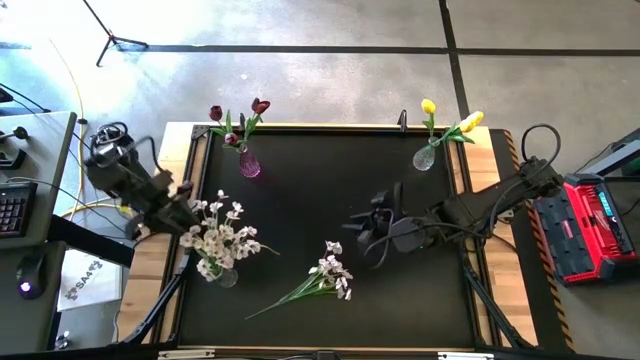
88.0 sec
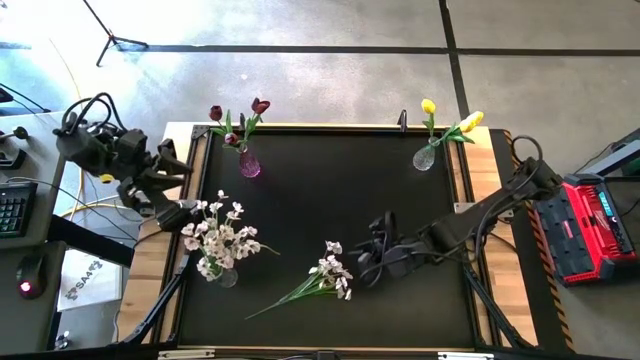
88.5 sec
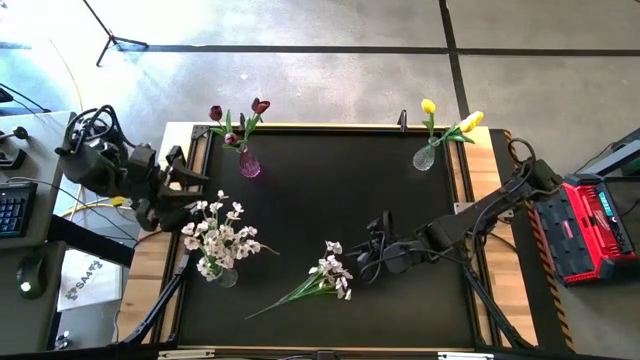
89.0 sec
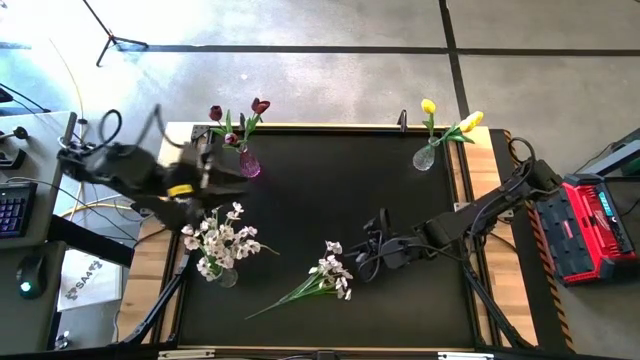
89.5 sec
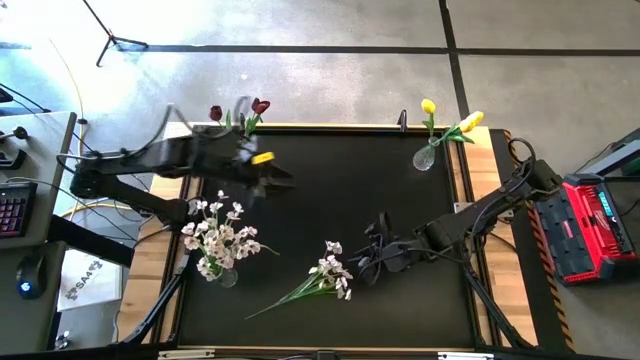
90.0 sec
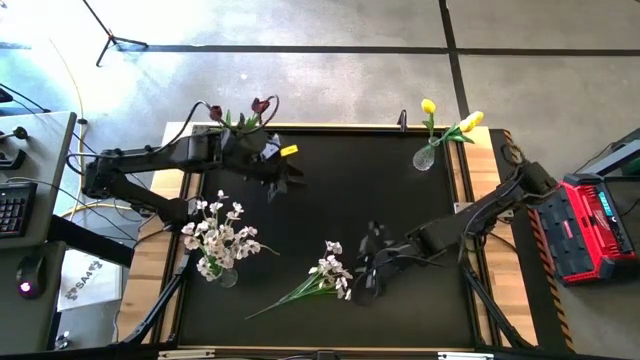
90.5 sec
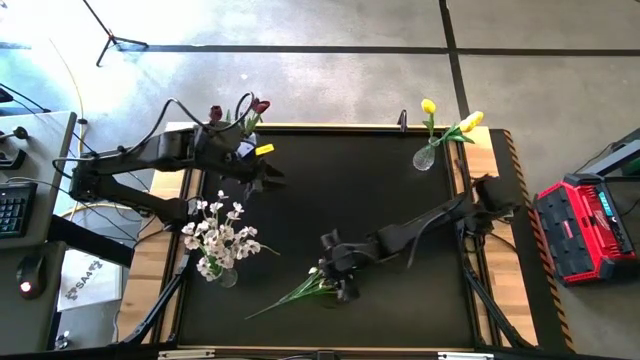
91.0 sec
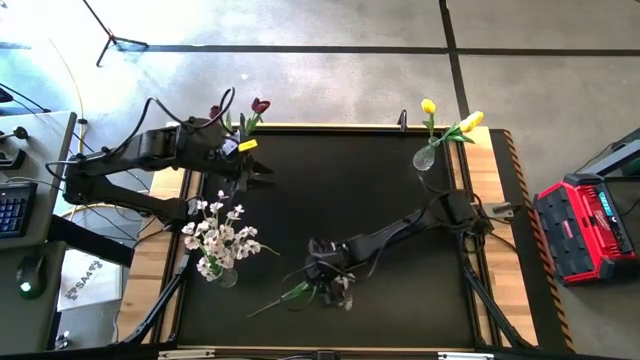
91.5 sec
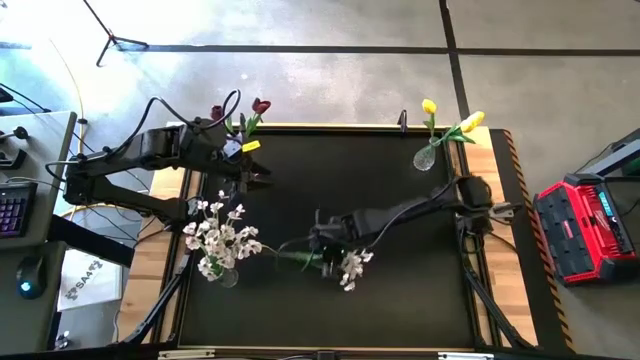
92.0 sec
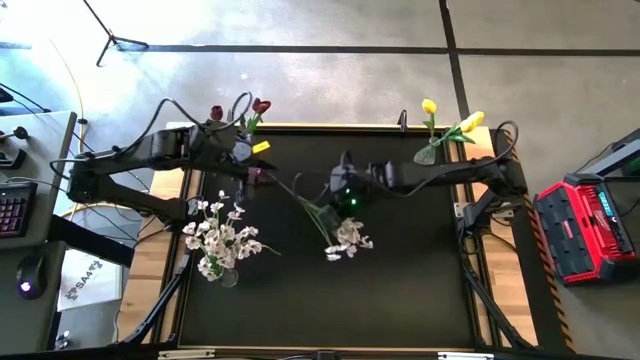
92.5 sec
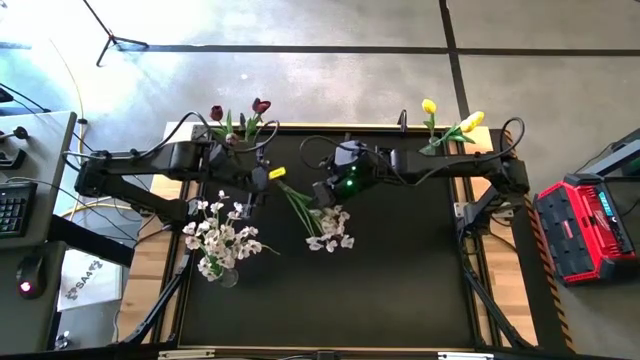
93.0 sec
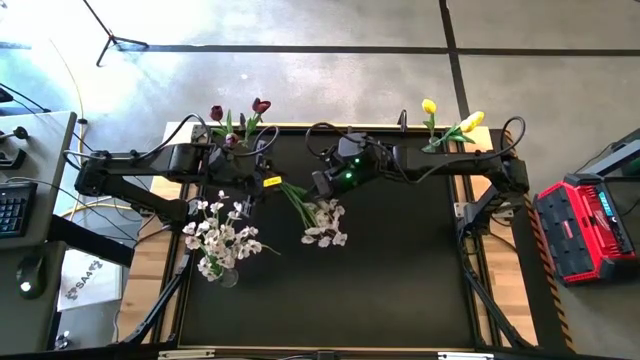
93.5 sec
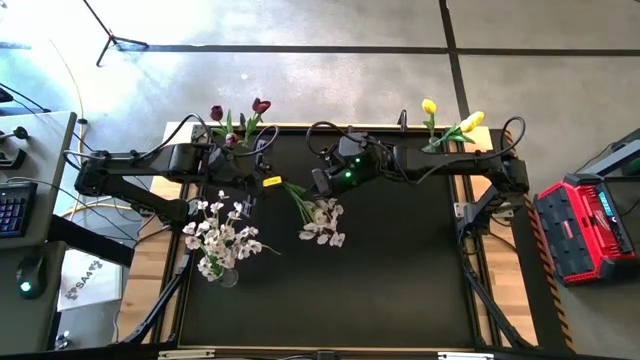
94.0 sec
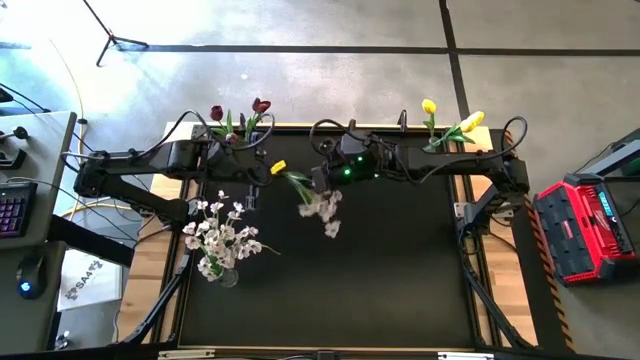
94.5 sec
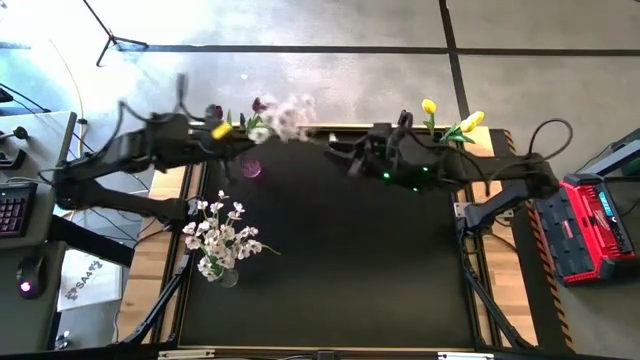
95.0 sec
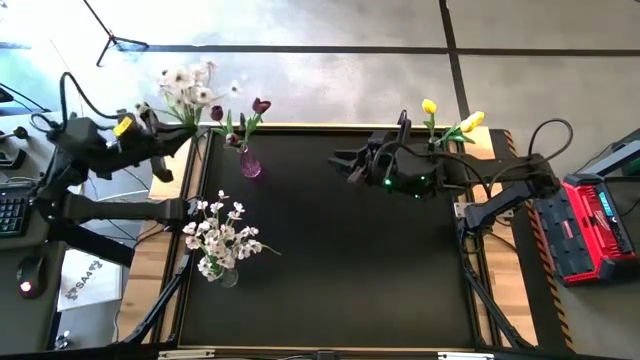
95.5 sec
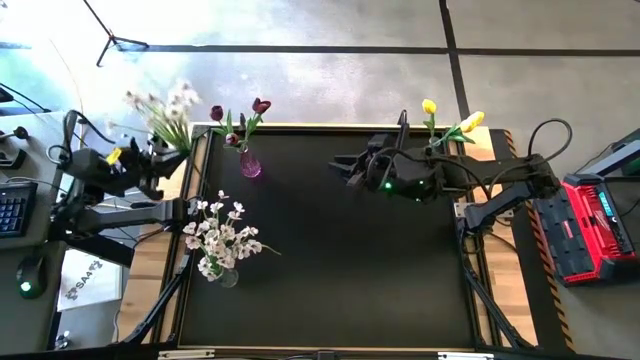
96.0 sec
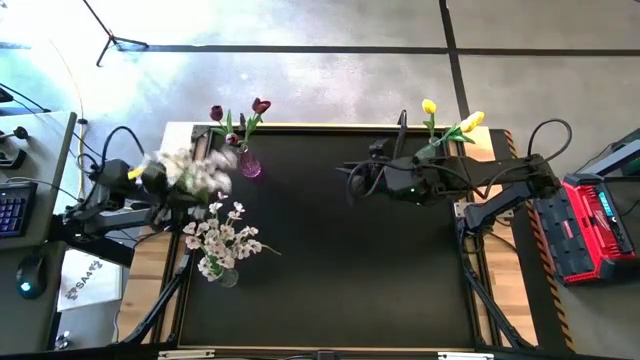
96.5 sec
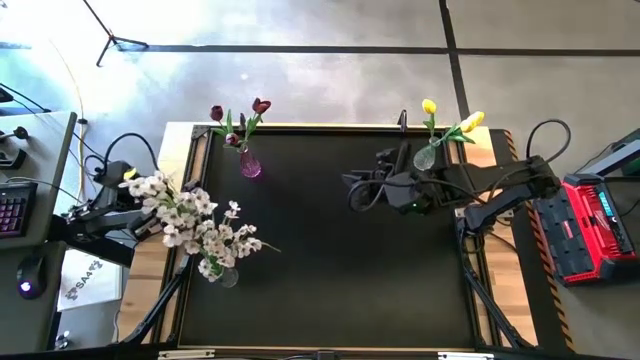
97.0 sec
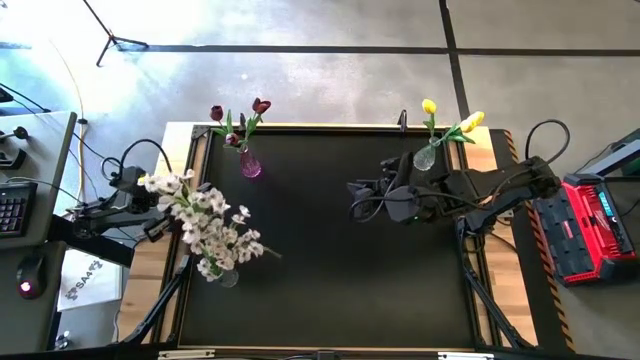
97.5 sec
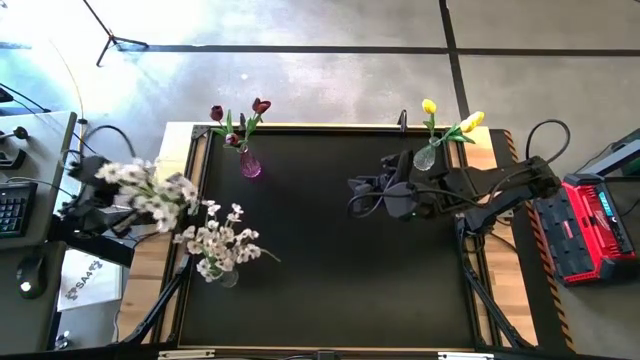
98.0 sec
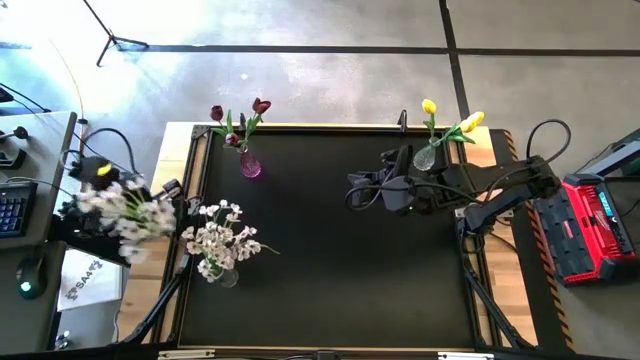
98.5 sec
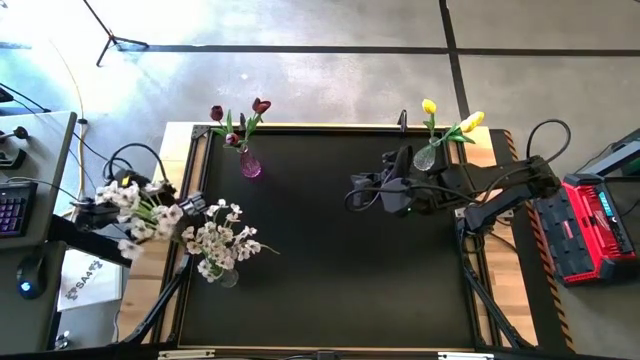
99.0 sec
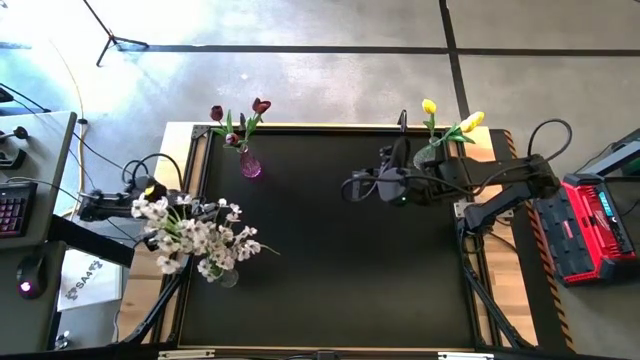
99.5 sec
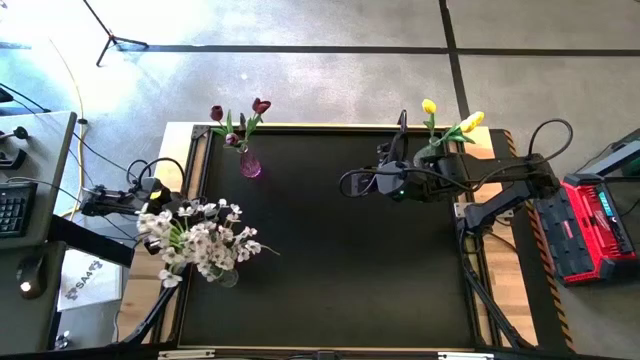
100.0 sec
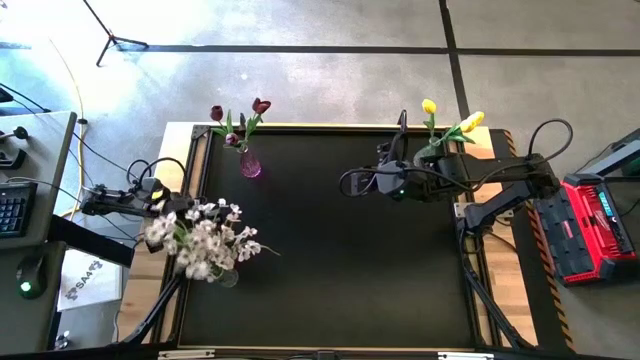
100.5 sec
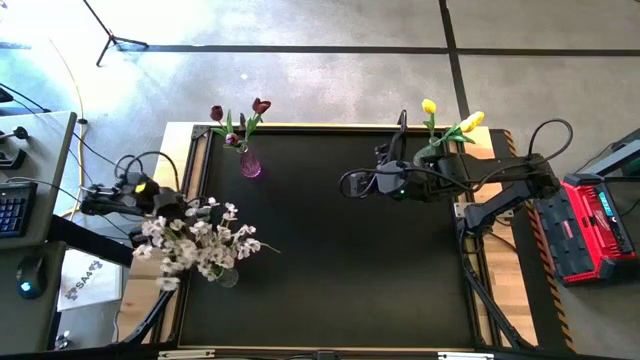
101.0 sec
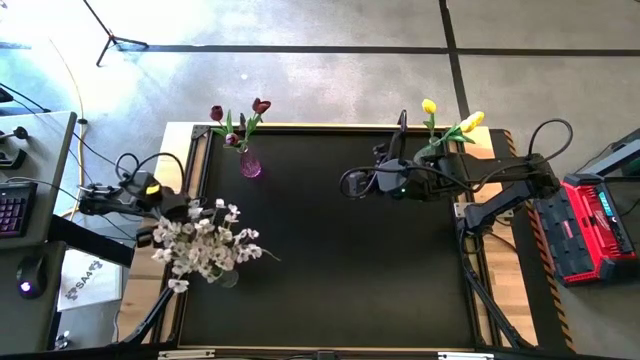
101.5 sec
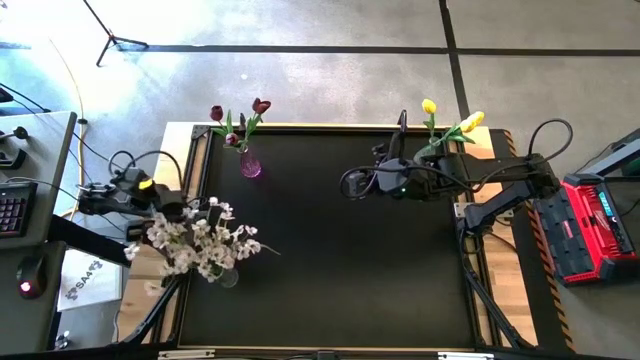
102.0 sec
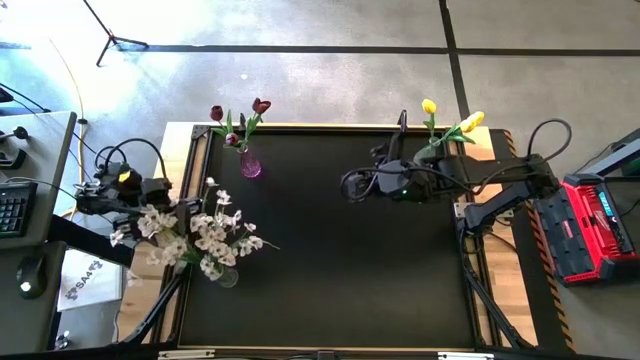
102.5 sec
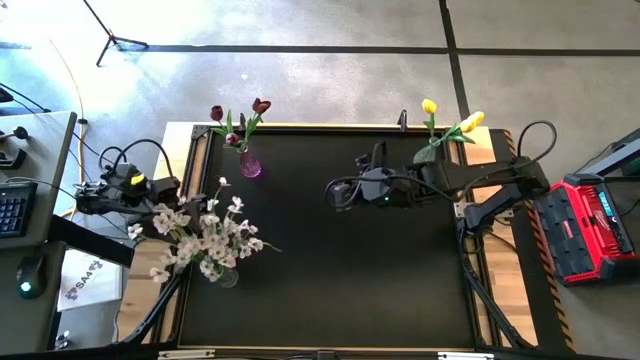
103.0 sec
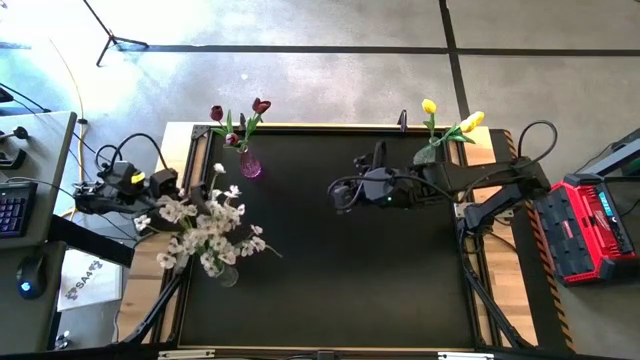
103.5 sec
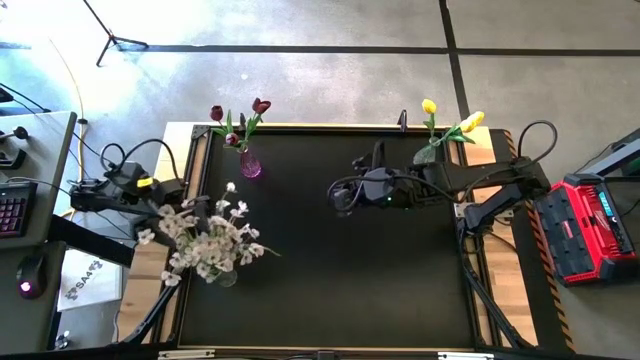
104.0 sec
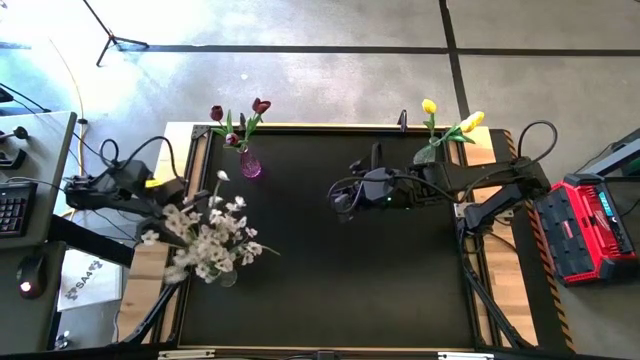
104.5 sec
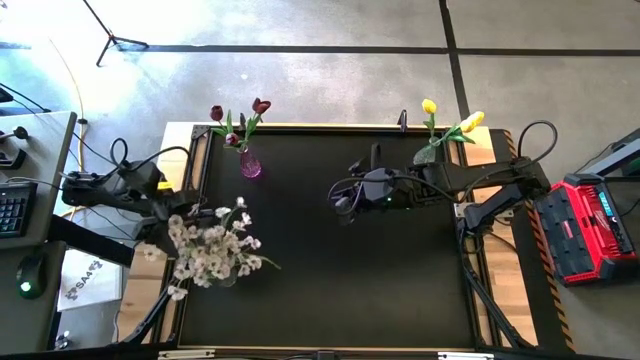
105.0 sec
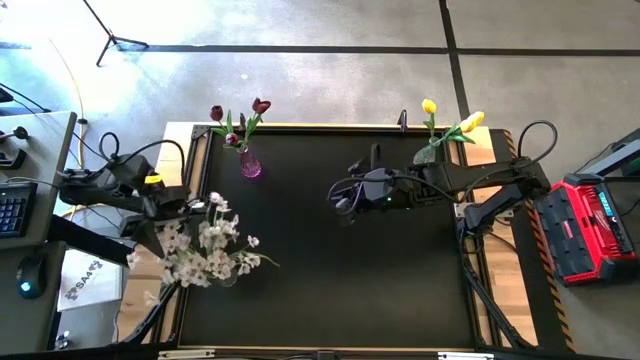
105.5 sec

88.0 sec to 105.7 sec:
Task: Sort flowers into vase by color
Put the white flowers into the bottom transparent flower vase

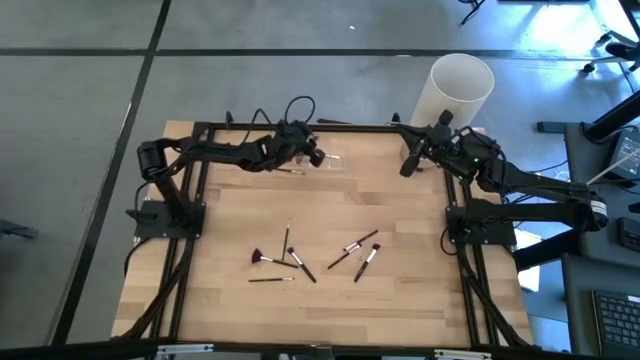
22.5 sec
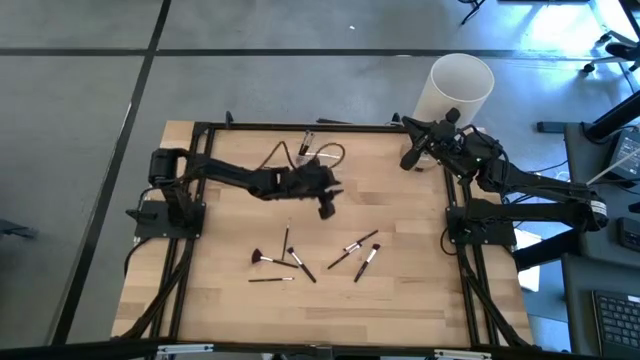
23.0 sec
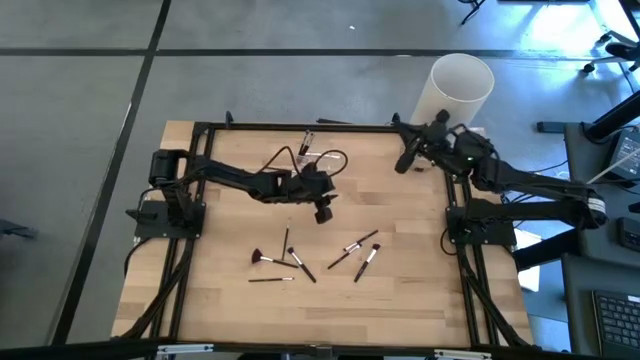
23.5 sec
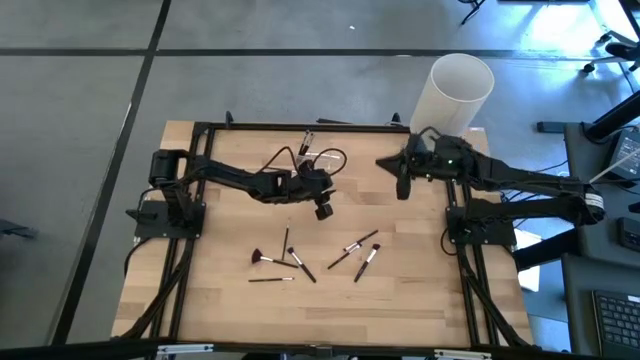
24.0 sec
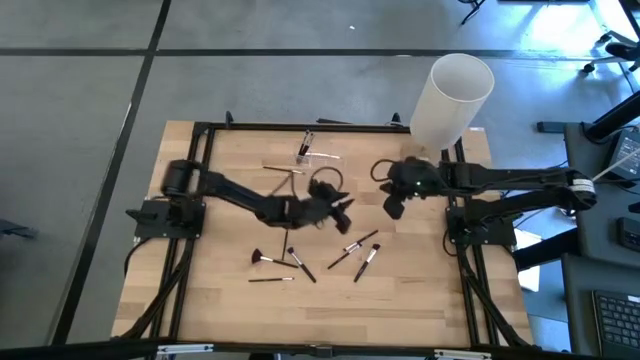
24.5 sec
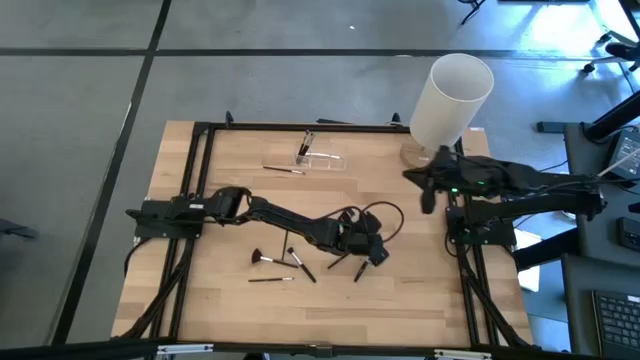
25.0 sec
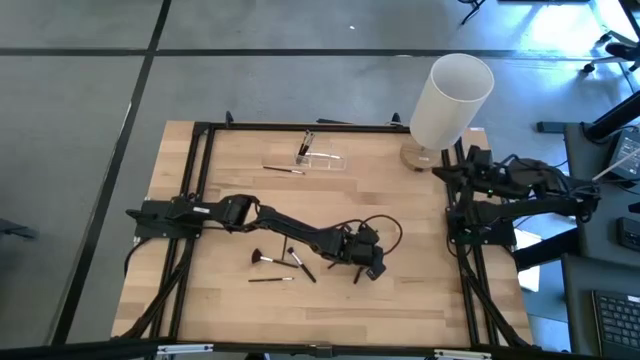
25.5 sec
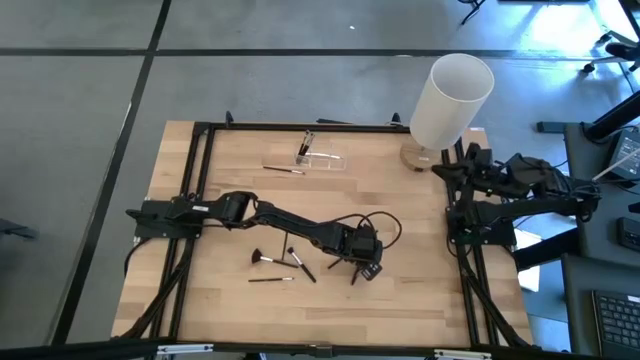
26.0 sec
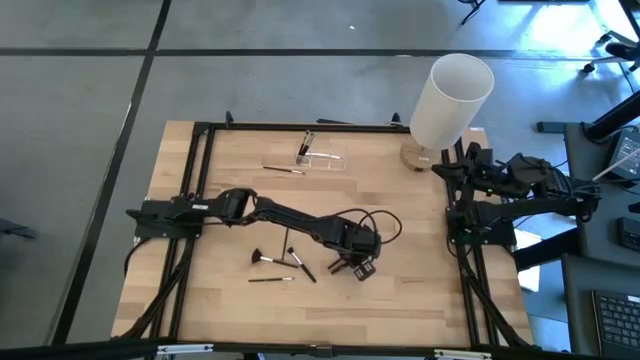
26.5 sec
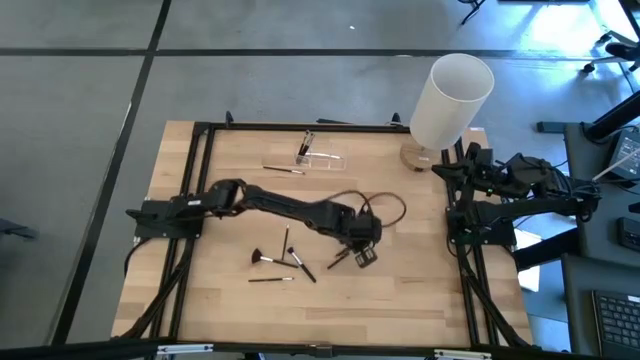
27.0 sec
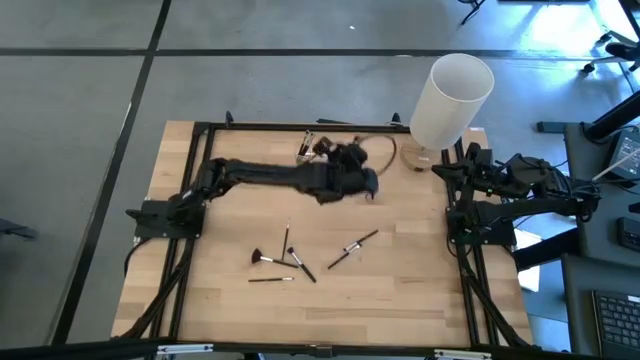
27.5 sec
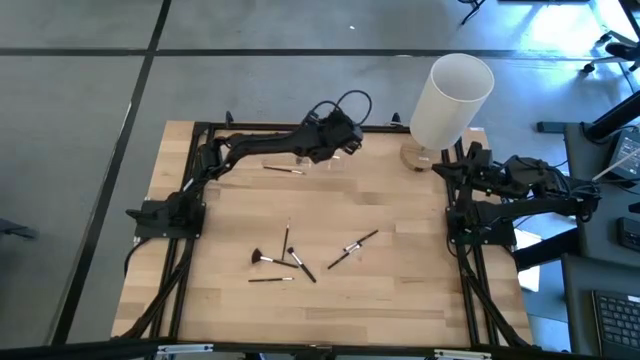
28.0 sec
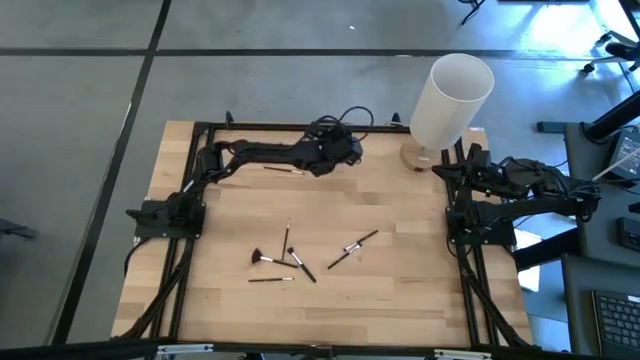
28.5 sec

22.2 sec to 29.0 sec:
Task: Pick & Place Makeup Brushes
Put the powder brush into the transparent organizer
